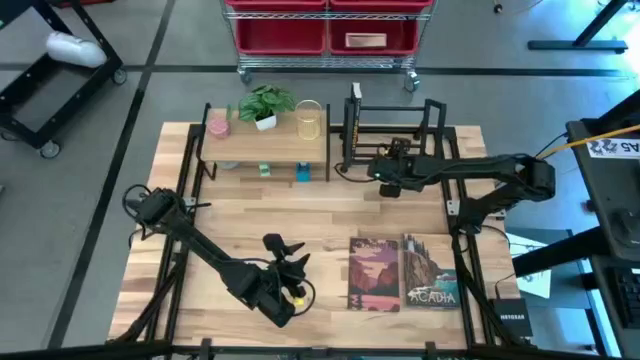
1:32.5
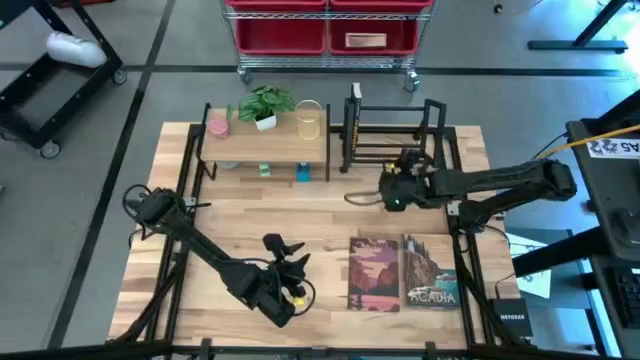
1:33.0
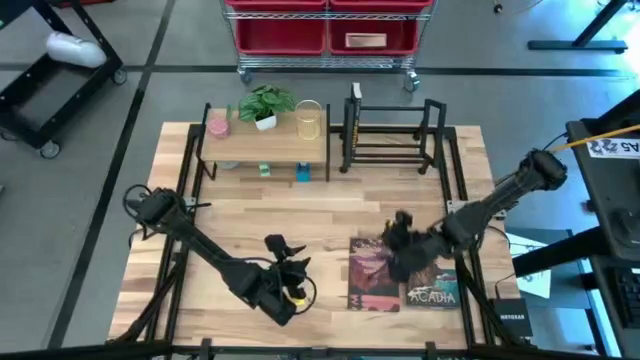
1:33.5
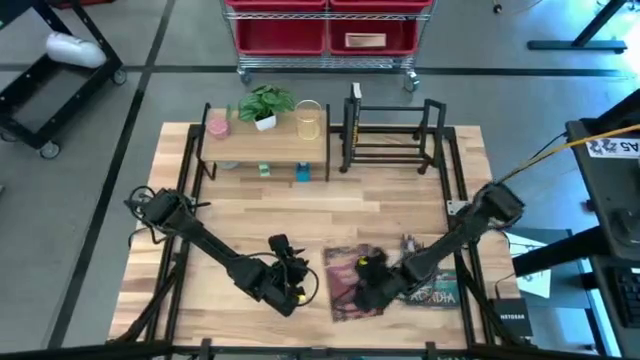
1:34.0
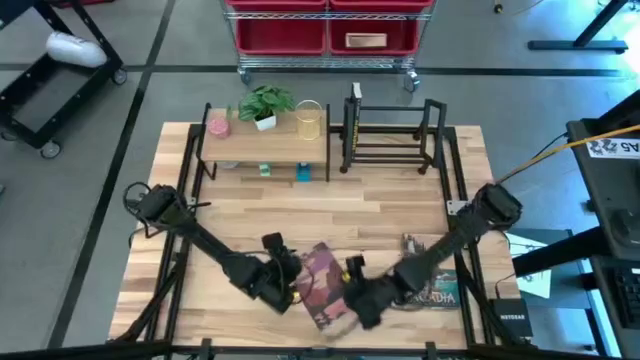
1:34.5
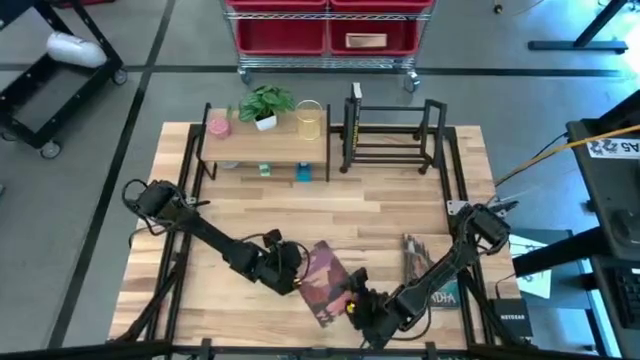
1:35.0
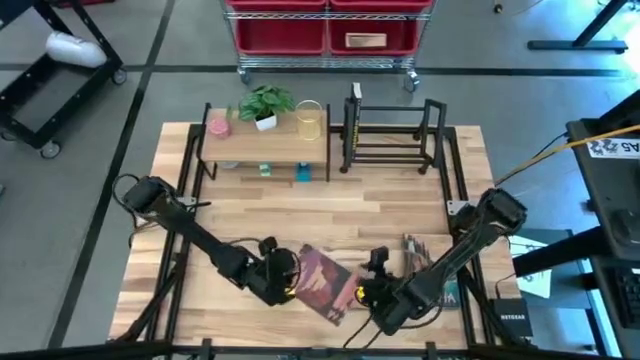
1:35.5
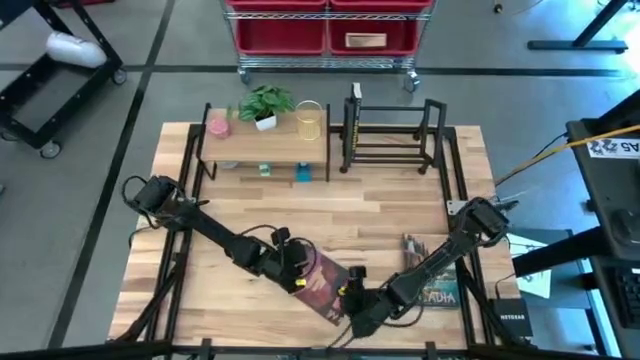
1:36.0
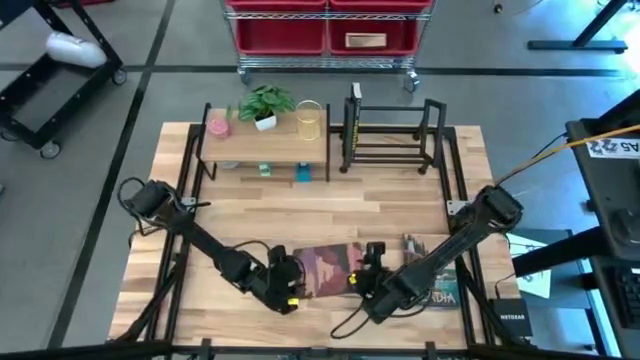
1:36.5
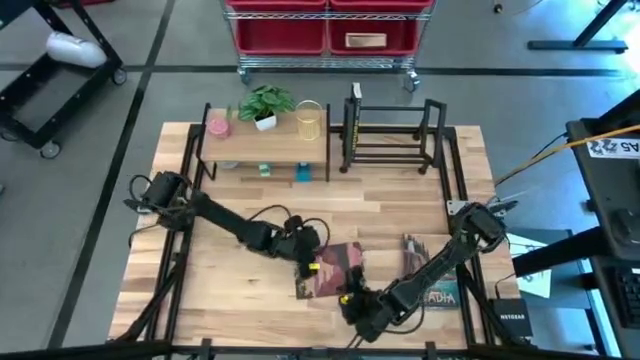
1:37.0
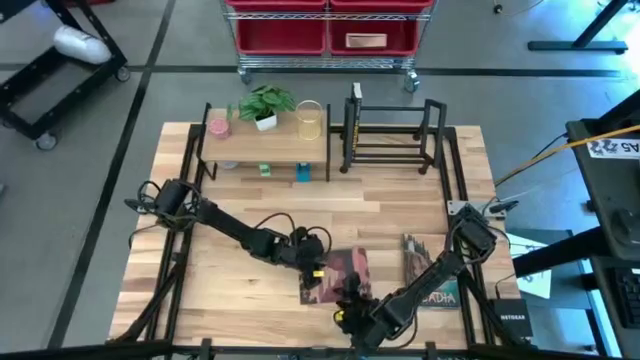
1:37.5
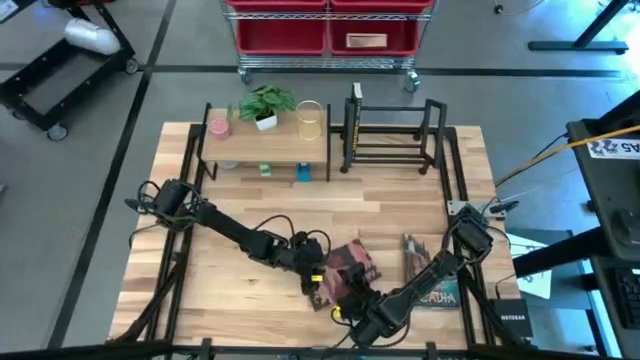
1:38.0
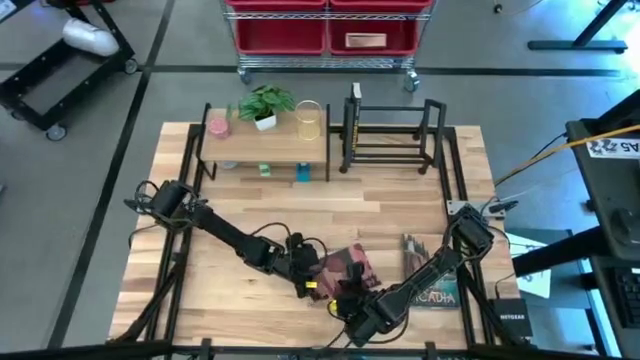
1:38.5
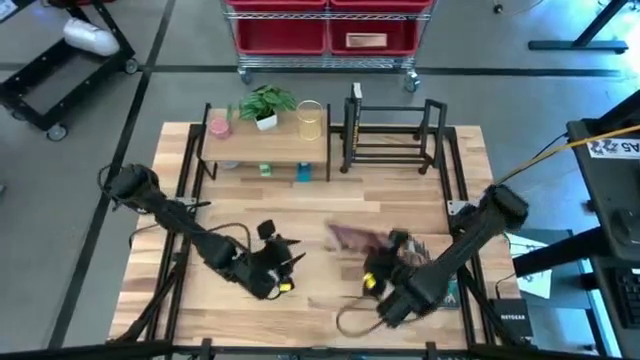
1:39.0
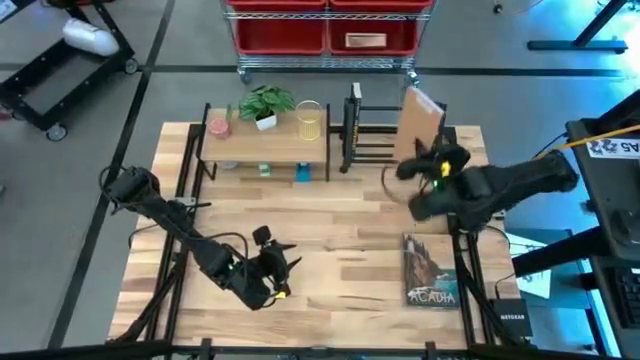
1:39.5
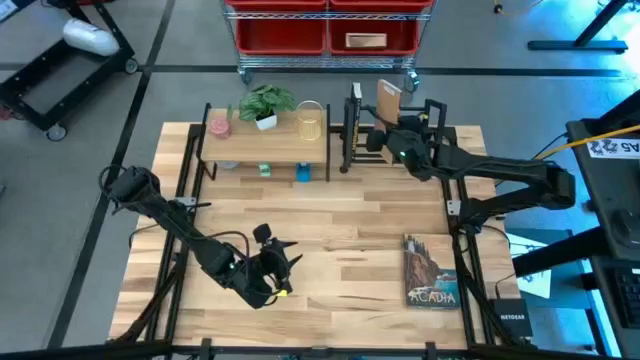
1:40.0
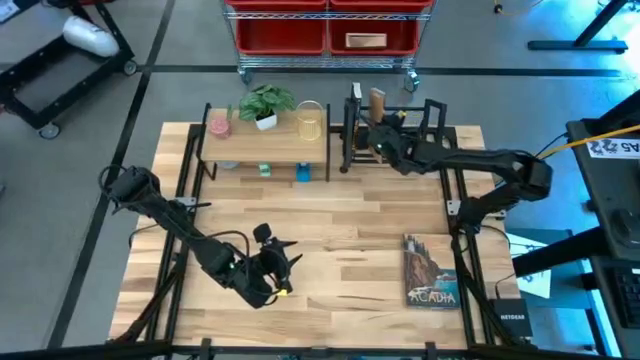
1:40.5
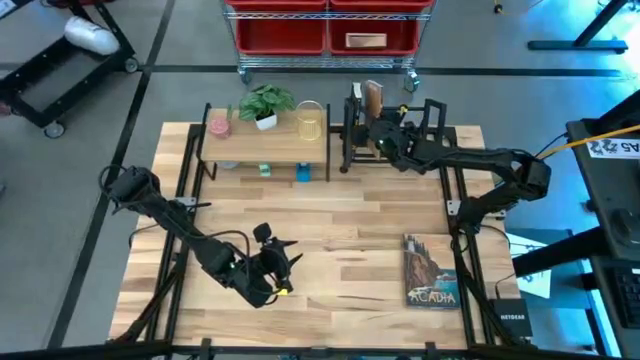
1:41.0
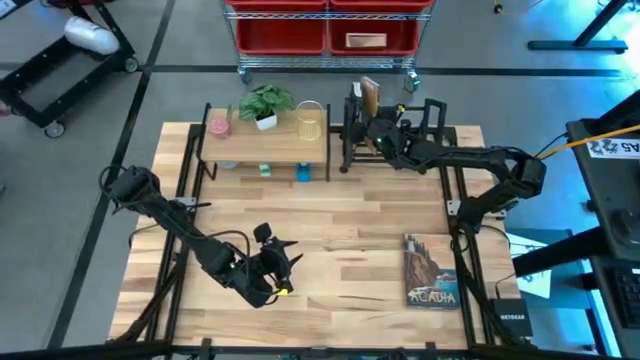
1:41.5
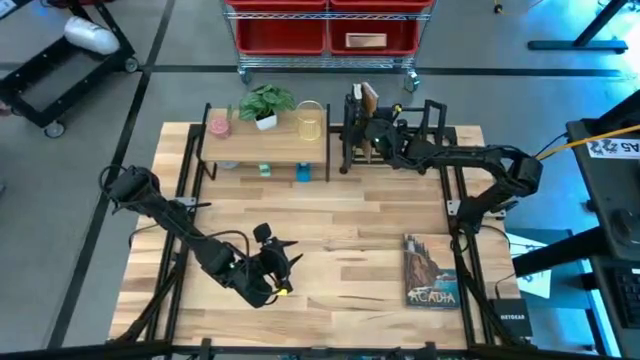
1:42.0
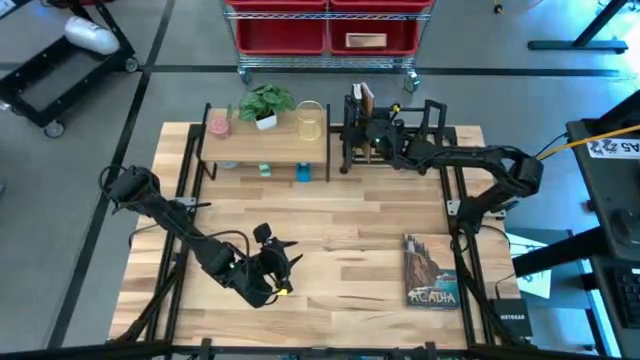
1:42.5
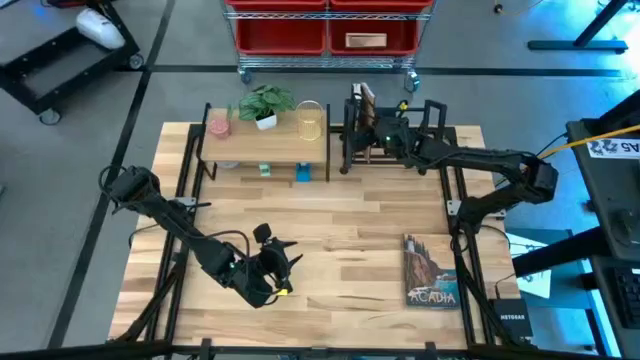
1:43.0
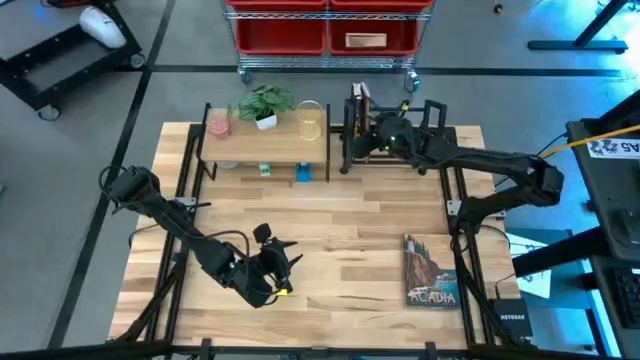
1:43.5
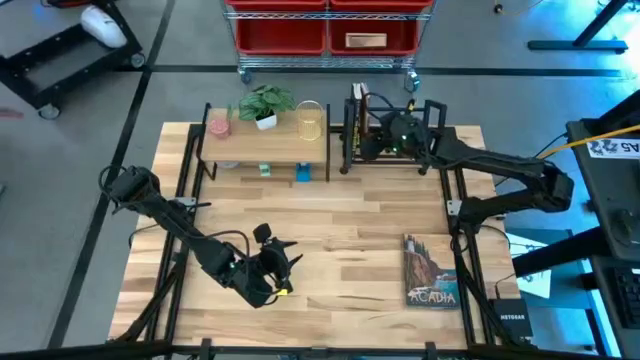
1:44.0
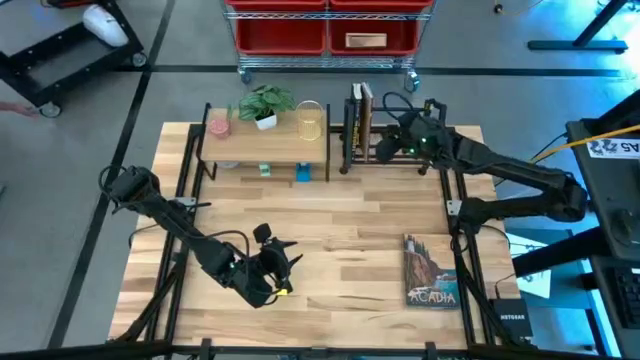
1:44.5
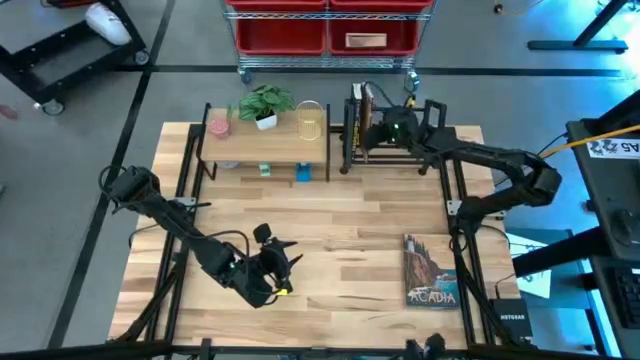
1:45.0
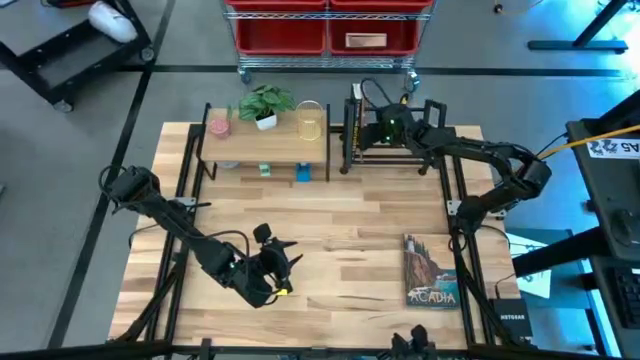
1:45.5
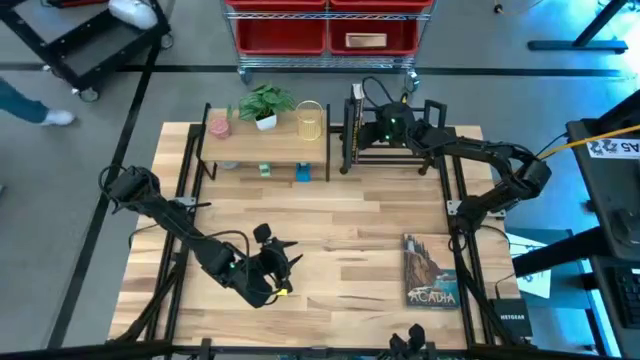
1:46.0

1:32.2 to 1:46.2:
Task: Stock shelves
Put the red purple book on the bookshelf

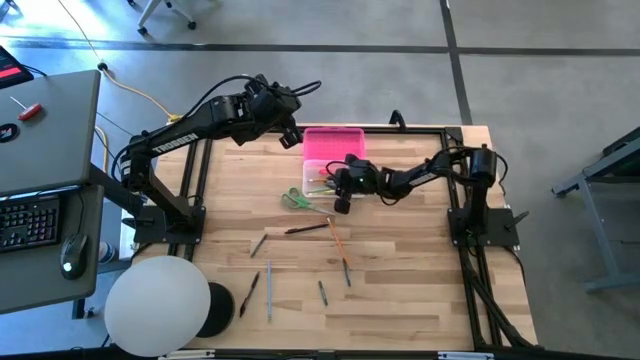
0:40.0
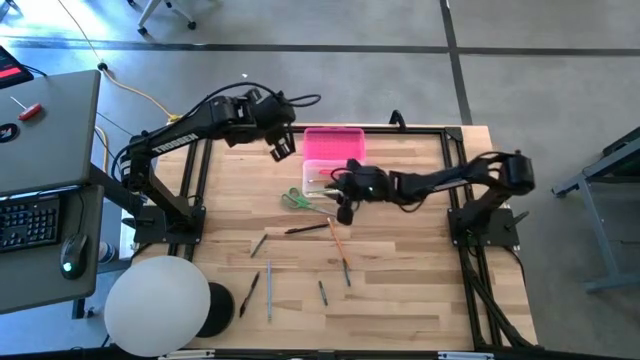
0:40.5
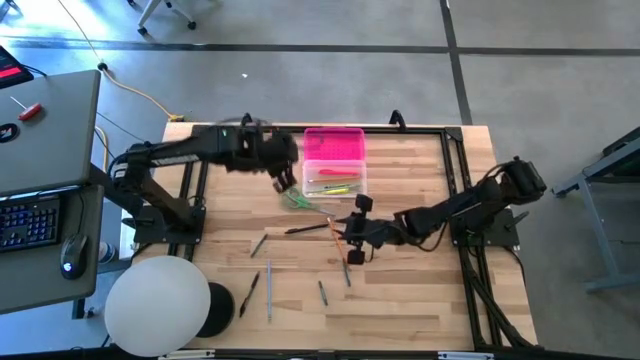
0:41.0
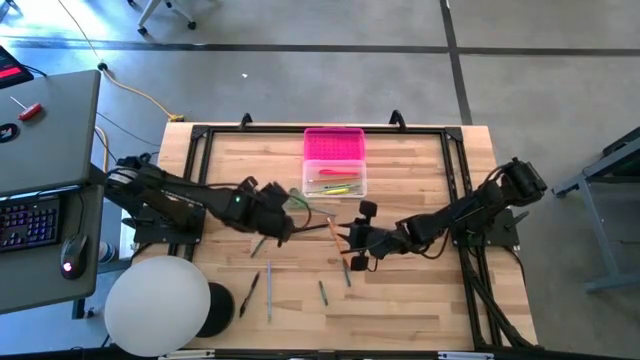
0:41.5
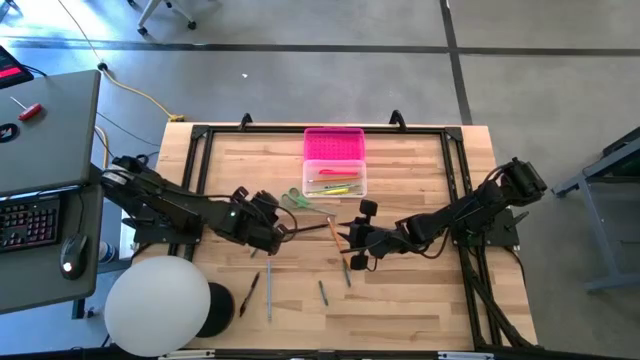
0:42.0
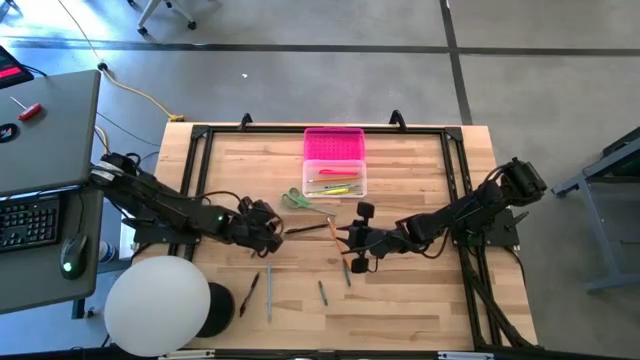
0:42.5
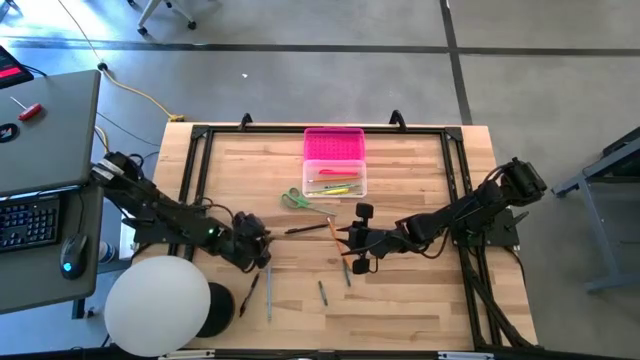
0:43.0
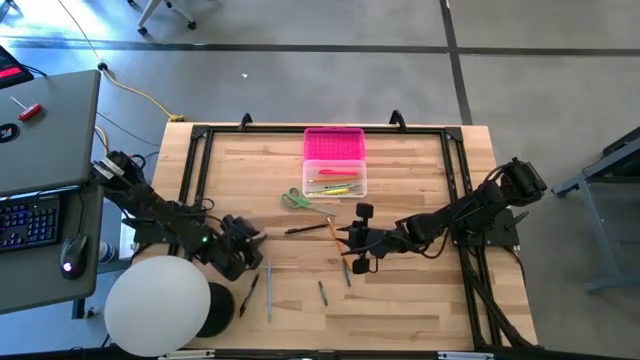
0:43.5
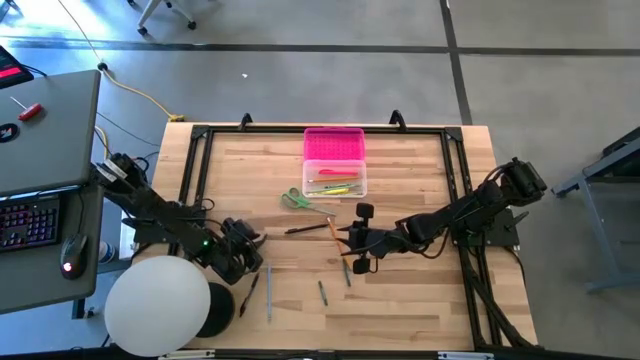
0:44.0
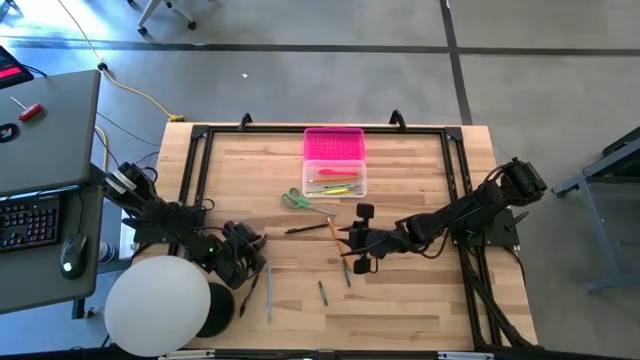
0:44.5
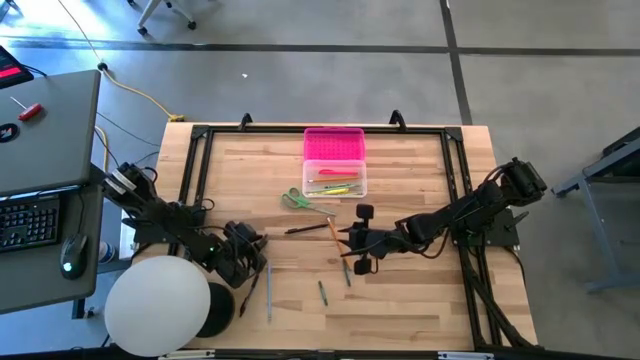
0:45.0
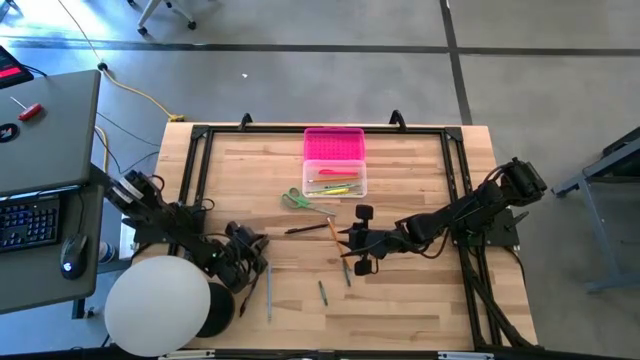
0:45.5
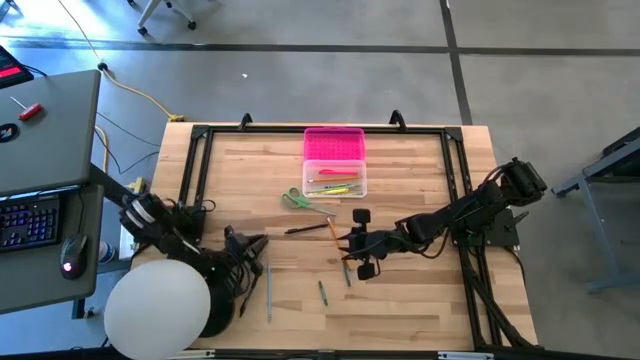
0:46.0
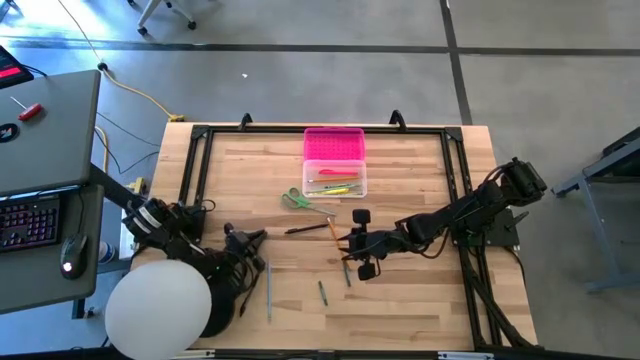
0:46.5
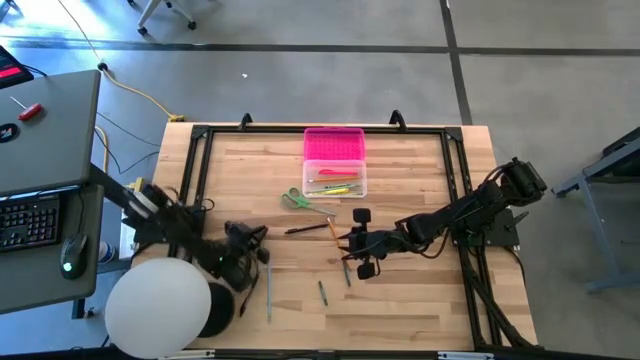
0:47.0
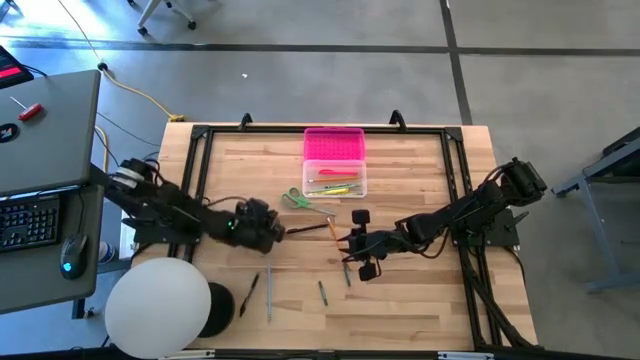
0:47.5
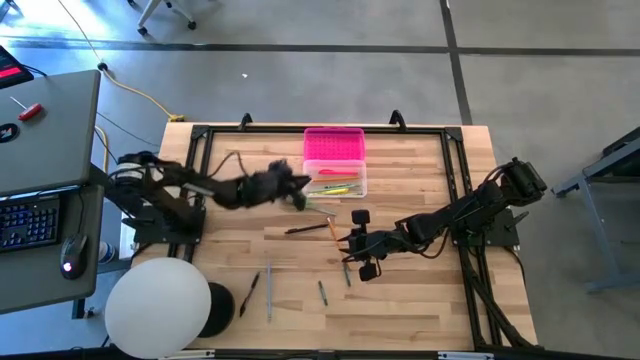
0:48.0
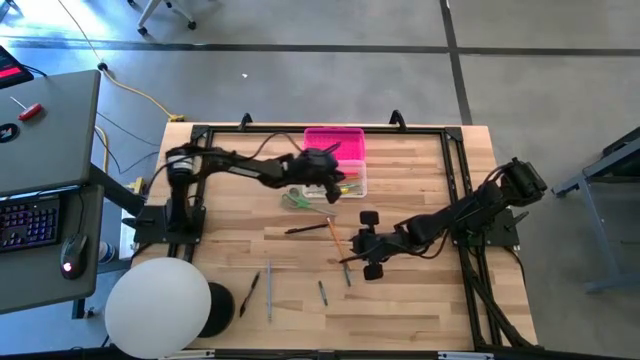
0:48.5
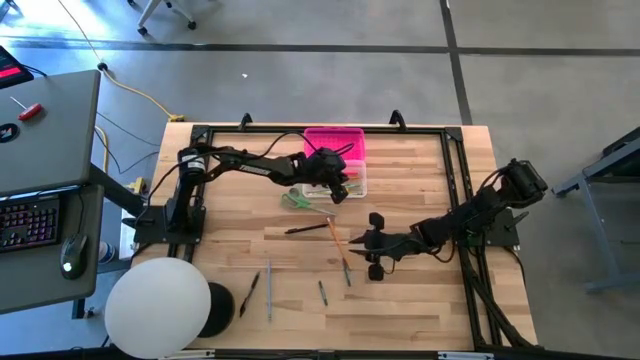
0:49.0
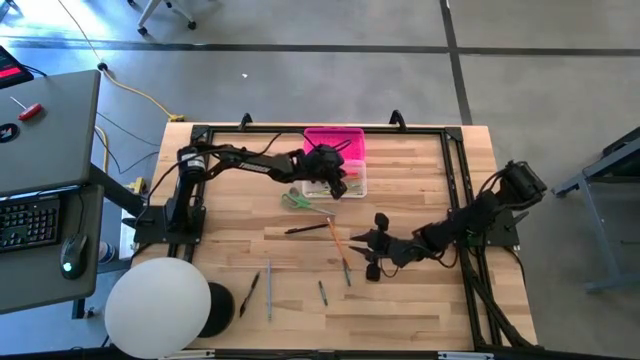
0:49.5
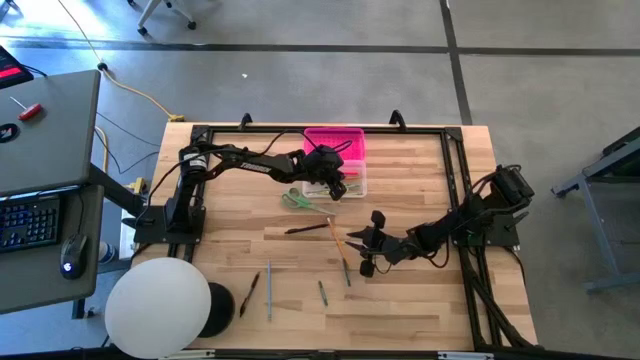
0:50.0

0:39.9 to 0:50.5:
Task: Pick & place school supplies into a supply box
Put the top dark green crayon into the supply box
